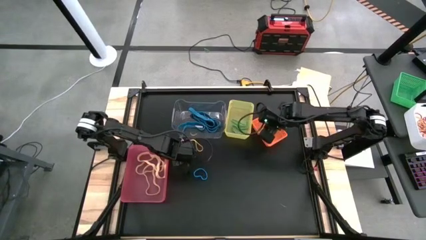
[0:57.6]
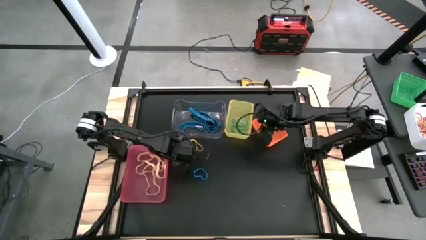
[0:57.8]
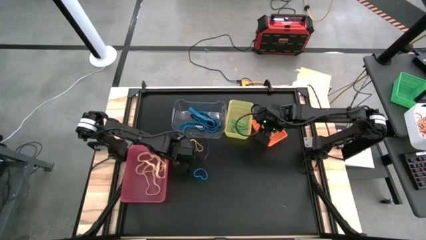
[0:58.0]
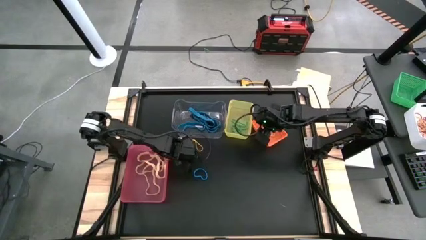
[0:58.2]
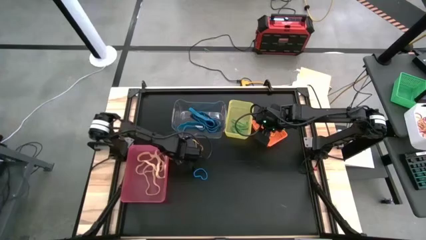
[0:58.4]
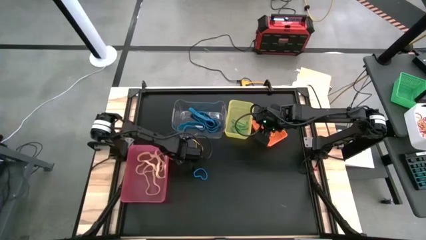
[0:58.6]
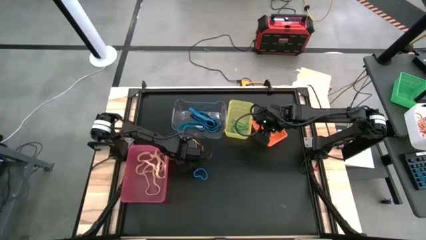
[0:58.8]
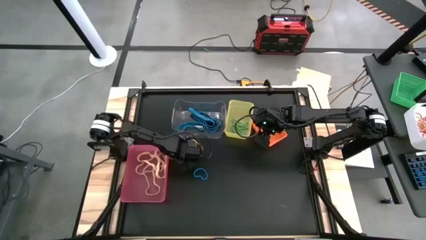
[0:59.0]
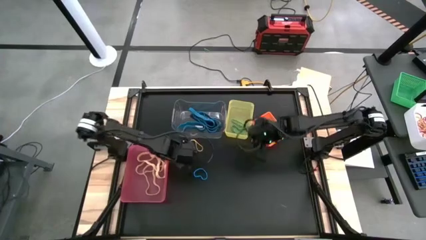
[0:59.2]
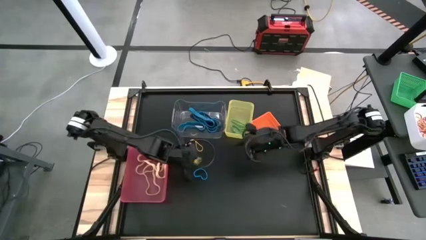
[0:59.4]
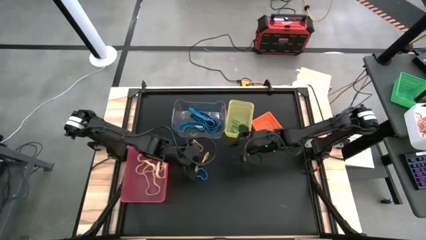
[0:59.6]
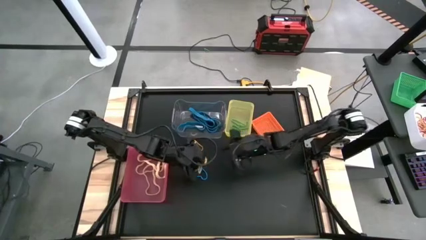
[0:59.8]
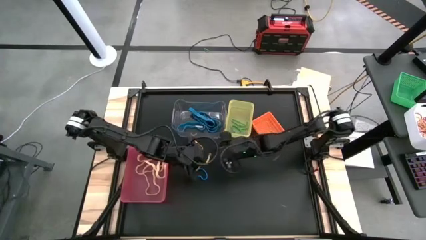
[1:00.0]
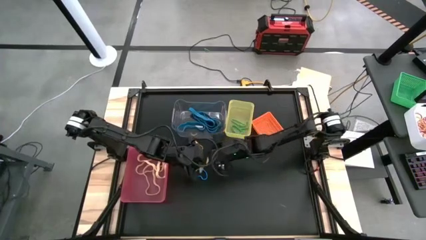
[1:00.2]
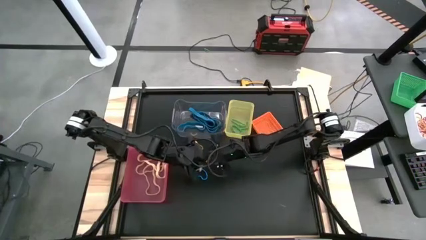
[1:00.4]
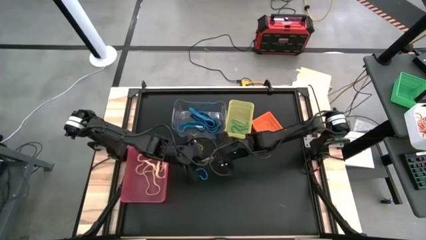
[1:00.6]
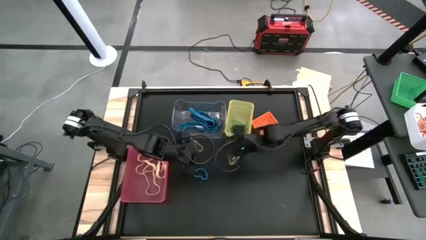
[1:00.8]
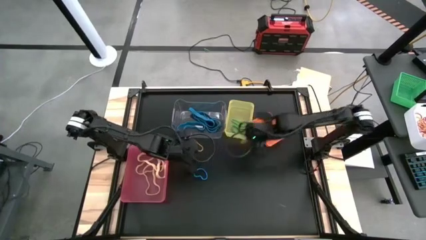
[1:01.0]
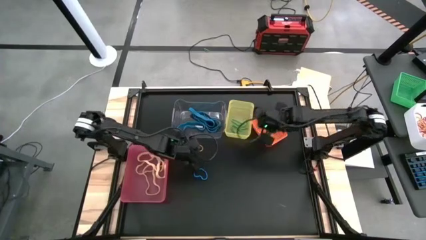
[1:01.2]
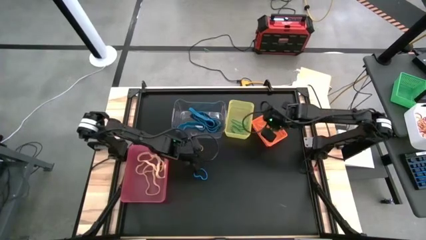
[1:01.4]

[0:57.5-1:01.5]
Task: Sort rubber bands into baskets
Put the yellow rubber band into the orange bin

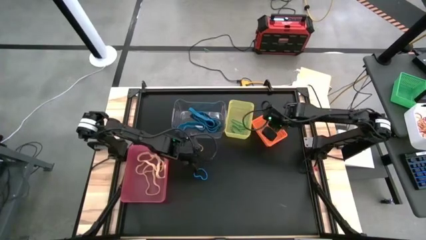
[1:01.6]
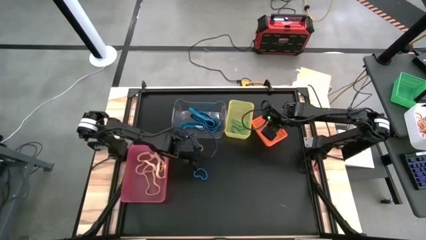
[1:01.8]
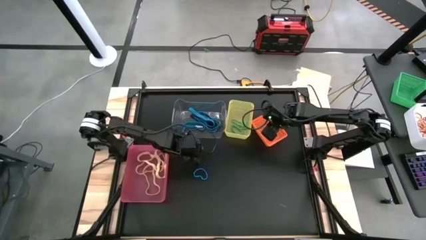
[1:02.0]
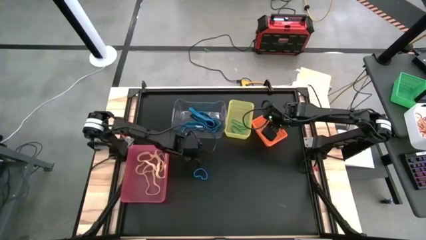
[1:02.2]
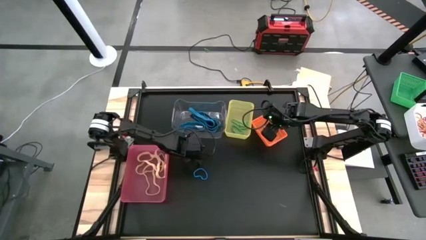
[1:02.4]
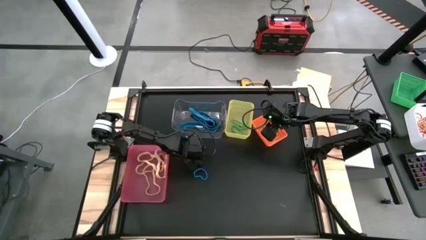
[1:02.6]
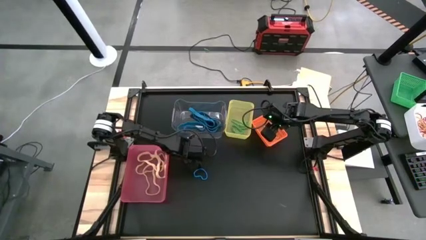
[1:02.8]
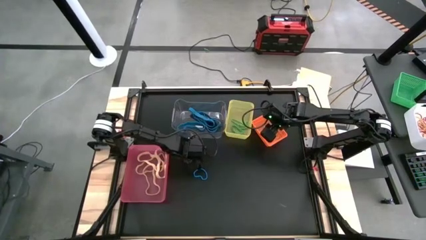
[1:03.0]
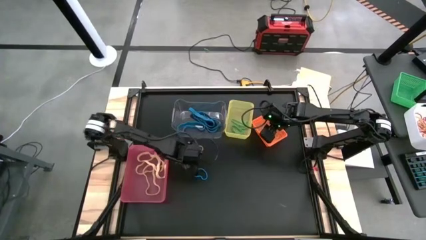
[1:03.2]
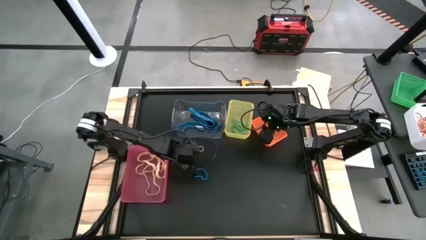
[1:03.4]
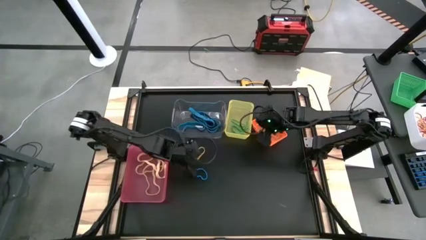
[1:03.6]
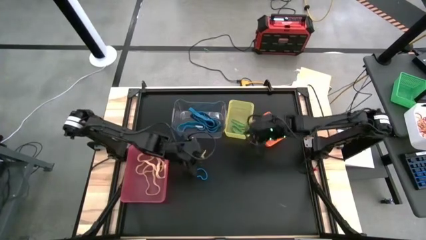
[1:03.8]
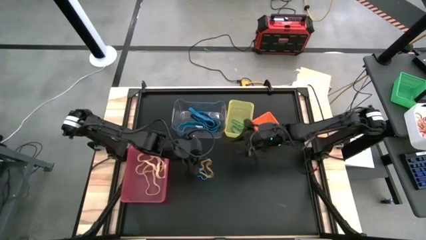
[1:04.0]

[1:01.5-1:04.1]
Put the yellow rubber band into the orange bin

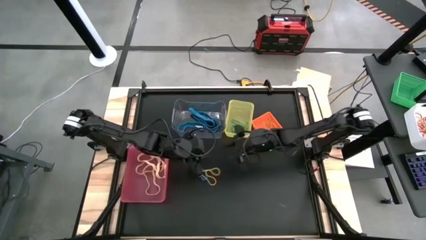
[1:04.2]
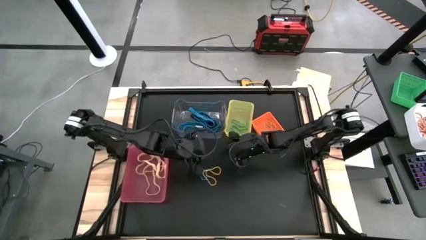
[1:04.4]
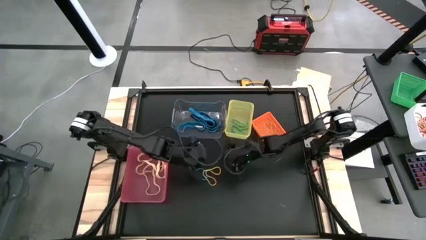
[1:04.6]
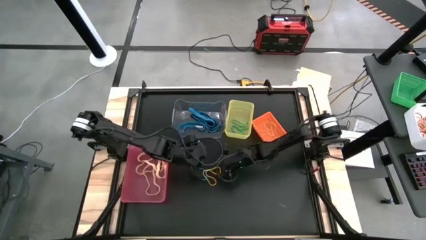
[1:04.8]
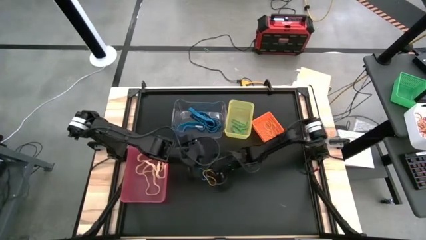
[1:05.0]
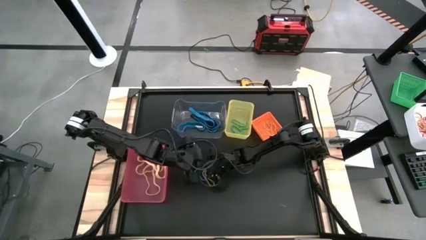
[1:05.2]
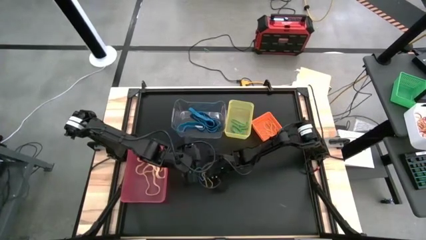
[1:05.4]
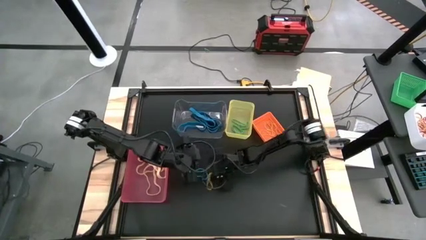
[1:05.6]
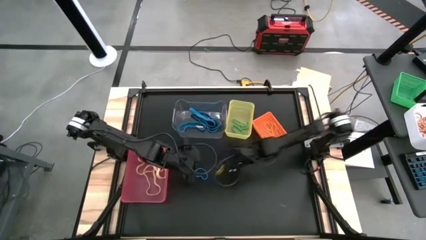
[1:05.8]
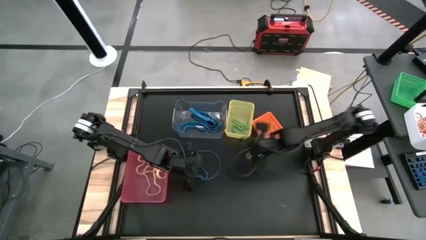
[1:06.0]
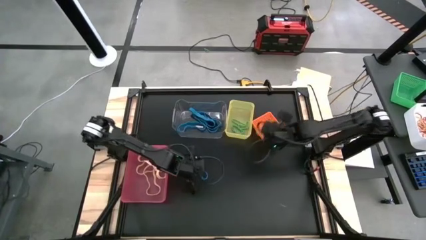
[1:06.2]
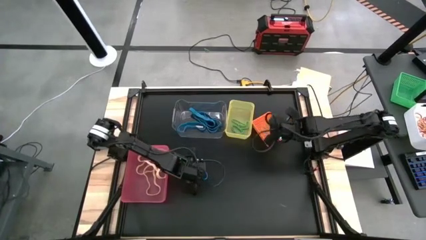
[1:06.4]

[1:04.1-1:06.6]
Put the yellow rubber band into the orange bin

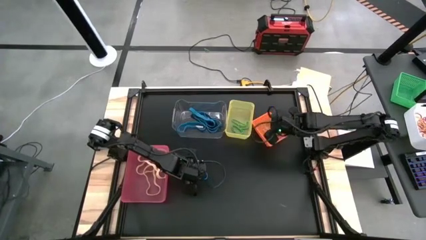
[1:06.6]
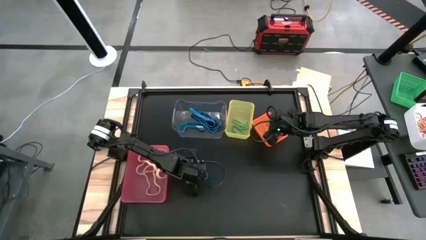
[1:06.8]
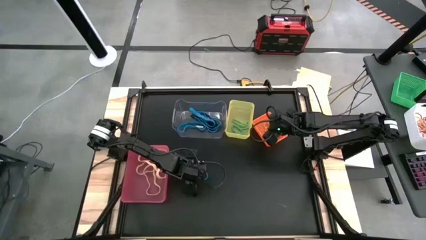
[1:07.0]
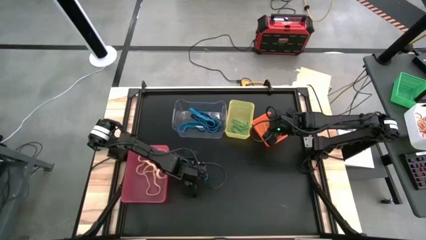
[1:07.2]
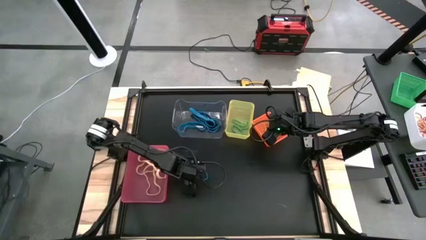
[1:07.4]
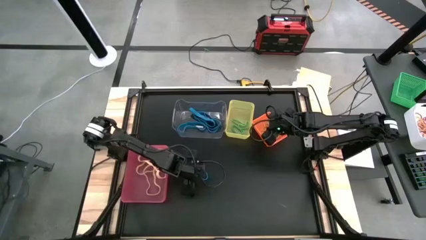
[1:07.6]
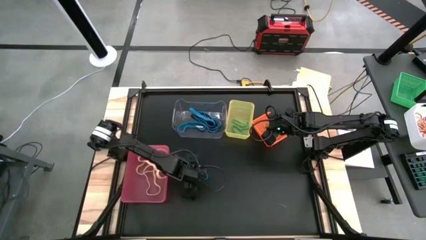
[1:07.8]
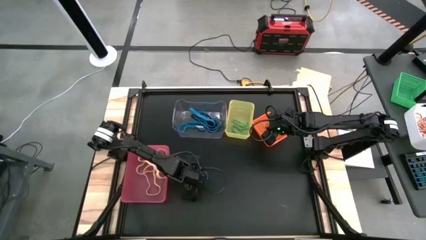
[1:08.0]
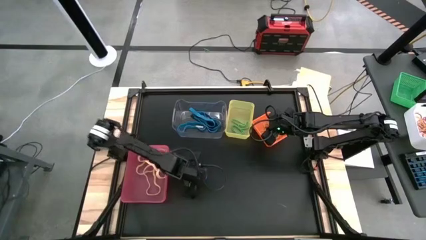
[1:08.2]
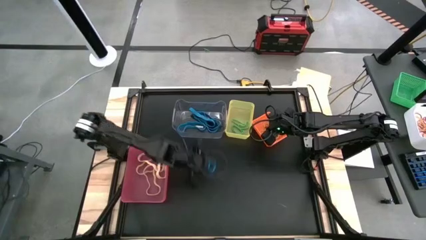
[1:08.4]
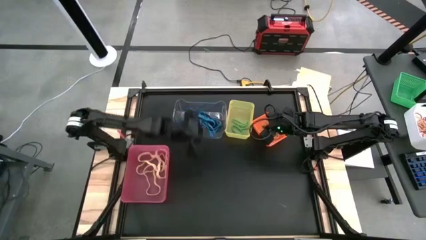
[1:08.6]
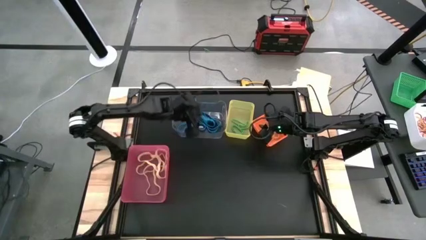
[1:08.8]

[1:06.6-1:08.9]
Put the blue rubber band into the transparent bin

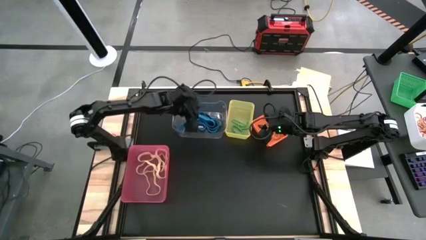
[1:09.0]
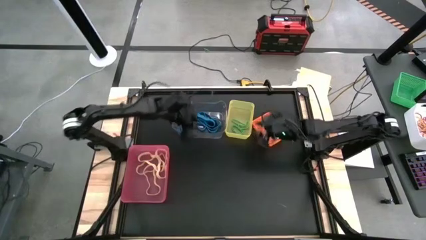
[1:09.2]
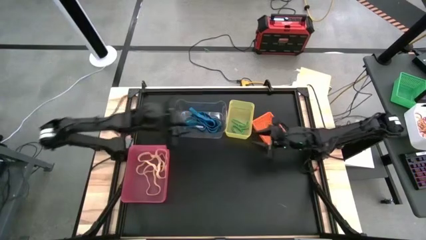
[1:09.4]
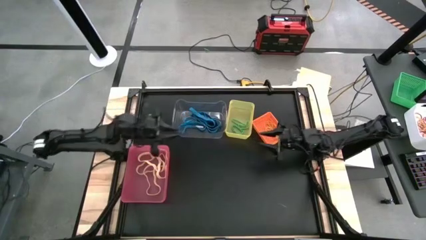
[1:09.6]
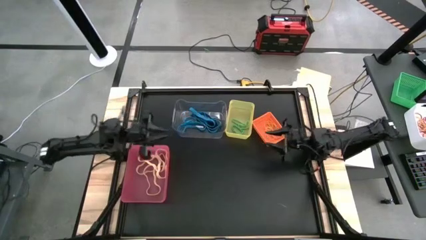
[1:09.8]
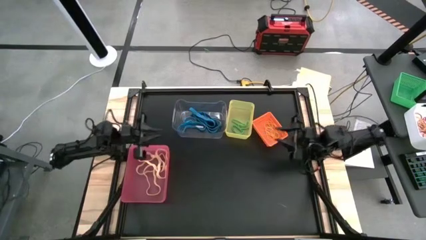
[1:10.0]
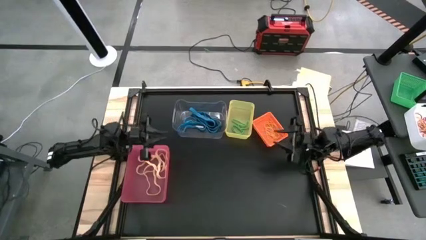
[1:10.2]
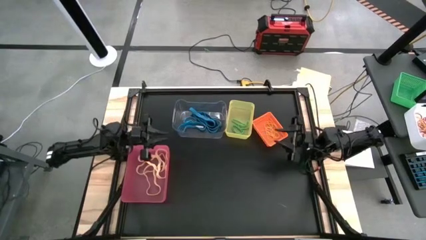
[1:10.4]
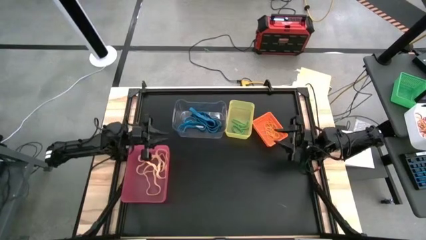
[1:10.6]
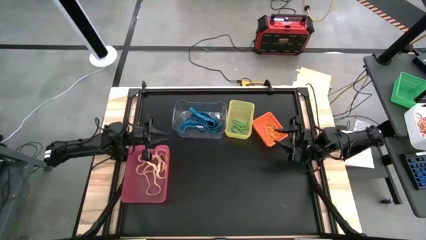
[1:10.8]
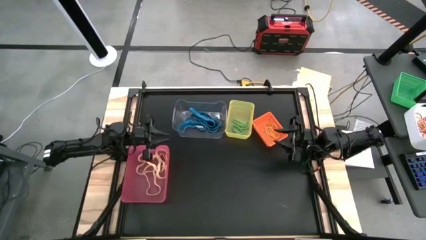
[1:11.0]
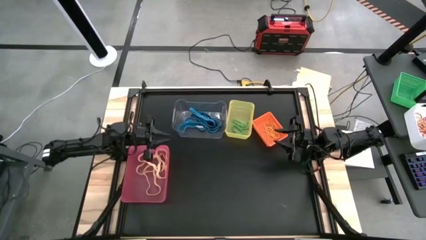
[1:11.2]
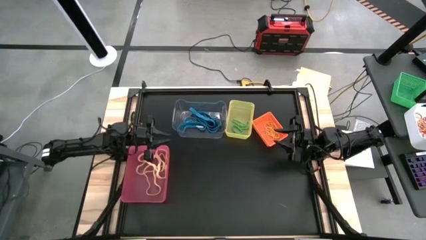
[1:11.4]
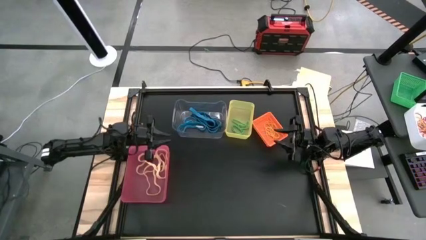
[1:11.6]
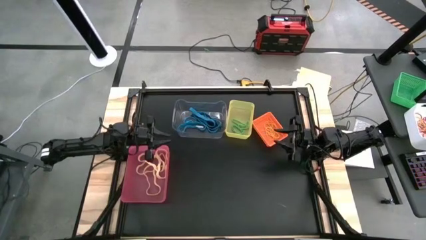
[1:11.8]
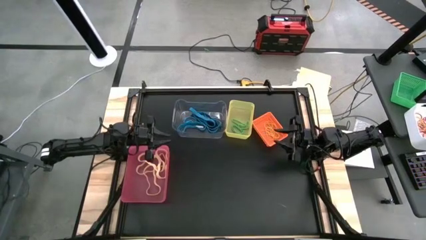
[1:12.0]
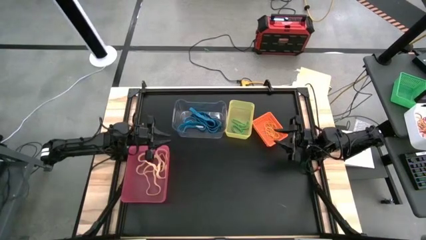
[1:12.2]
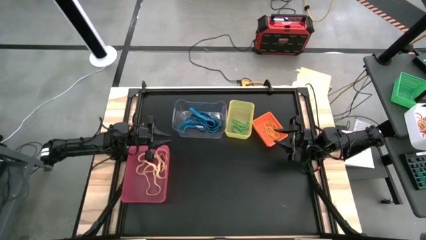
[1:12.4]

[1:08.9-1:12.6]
Return to Home Position

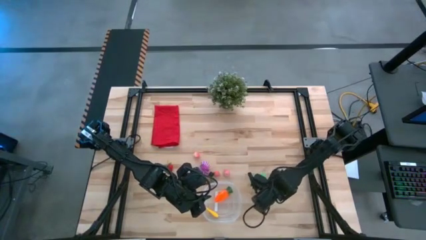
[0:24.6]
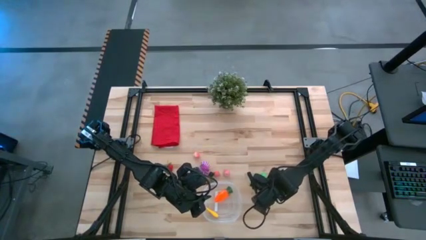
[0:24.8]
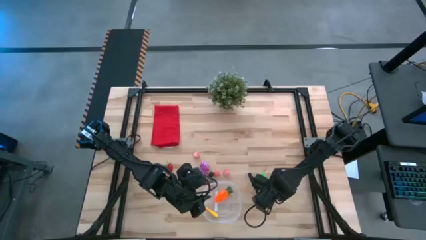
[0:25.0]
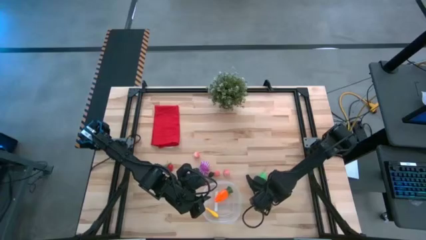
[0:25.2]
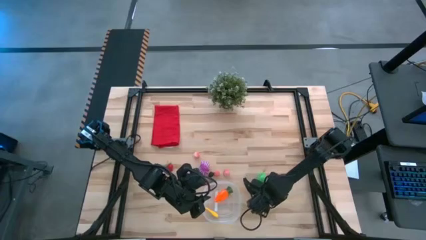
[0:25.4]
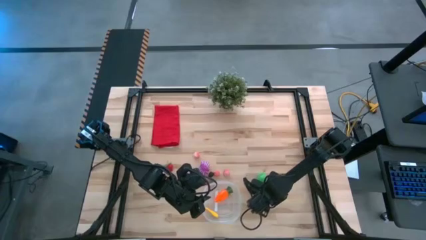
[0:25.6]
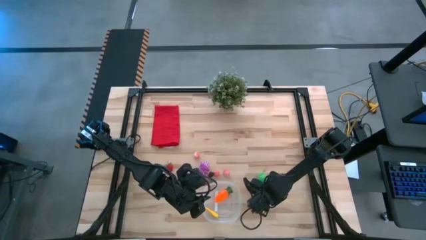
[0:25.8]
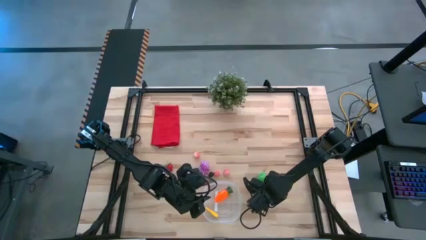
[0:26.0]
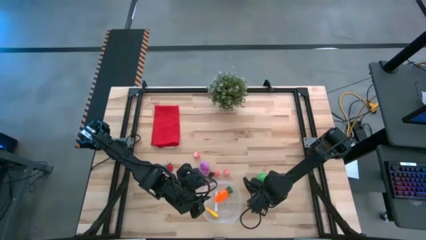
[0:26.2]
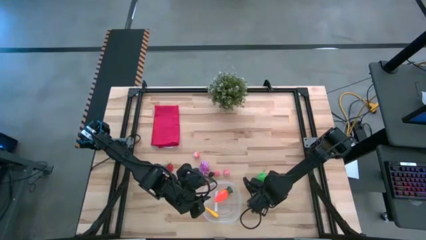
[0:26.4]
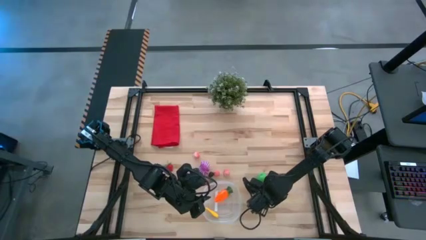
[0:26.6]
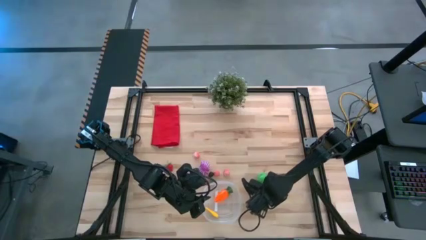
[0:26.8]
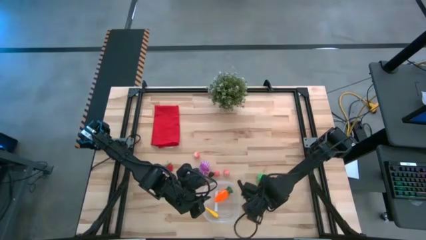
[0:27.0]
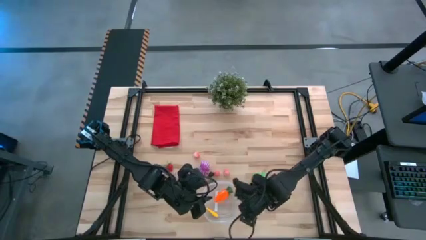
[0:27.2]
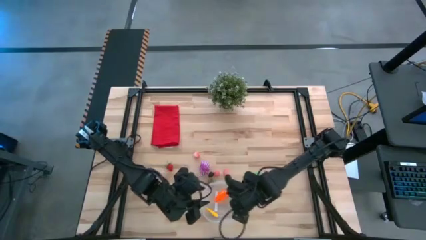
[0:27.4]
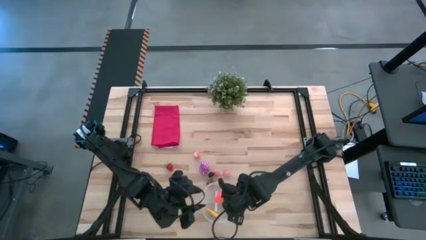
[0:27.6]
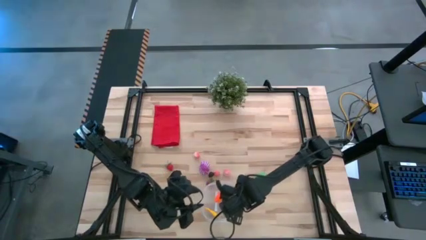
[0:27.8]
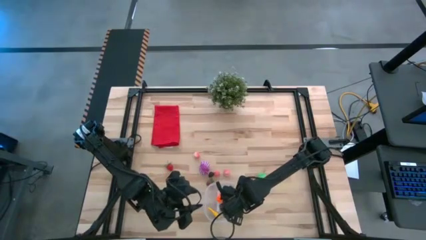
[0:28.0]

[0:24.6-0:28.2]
Task: Pick and placing Produce into tupperware
Put the green cabbage into the transparent bin
